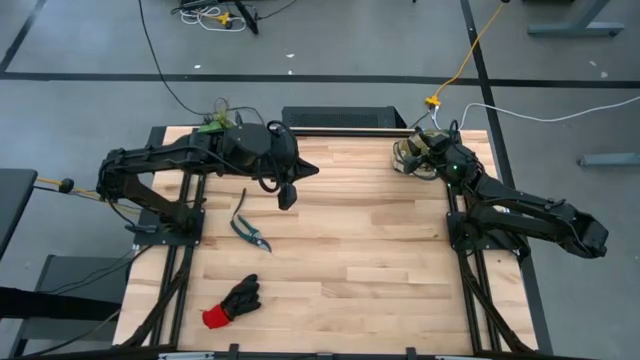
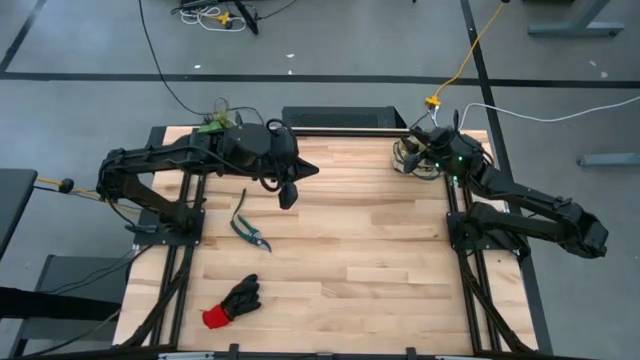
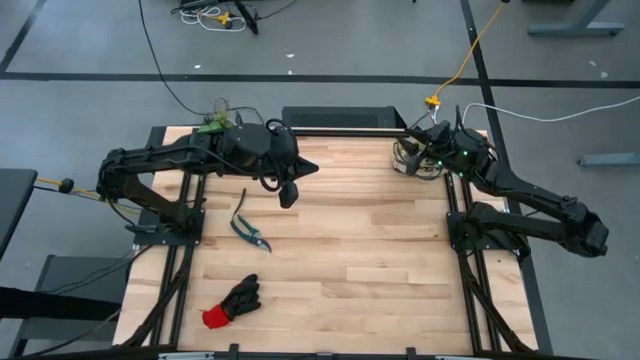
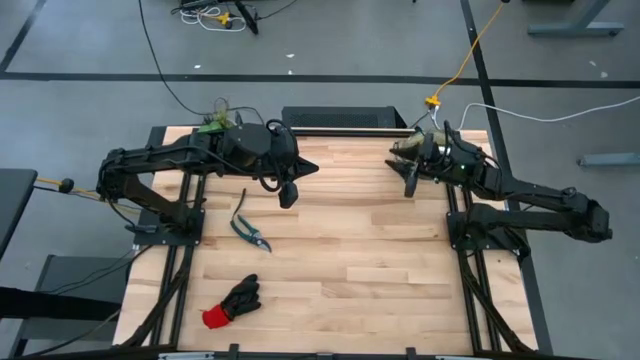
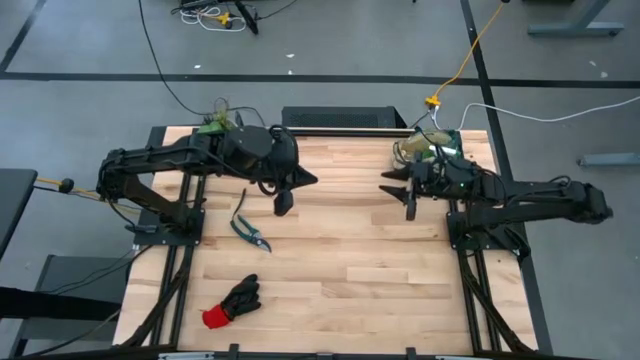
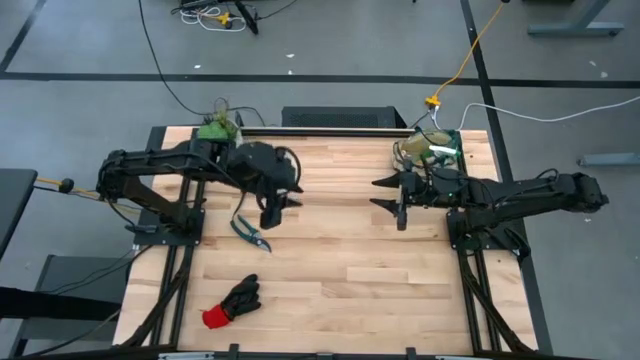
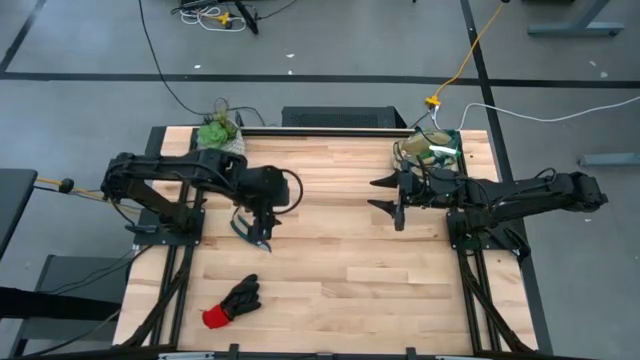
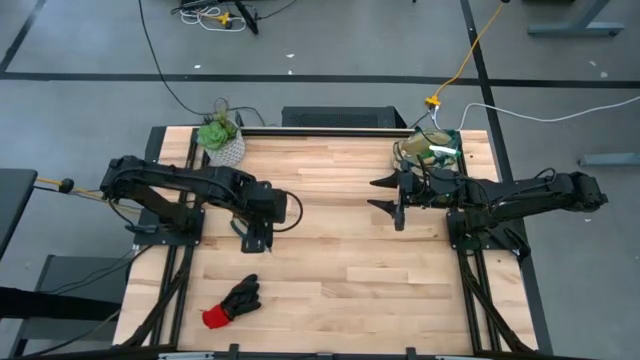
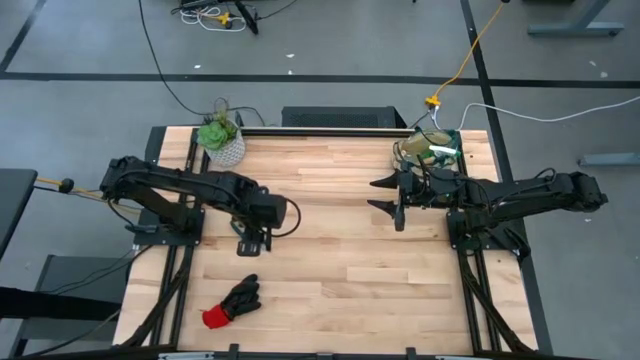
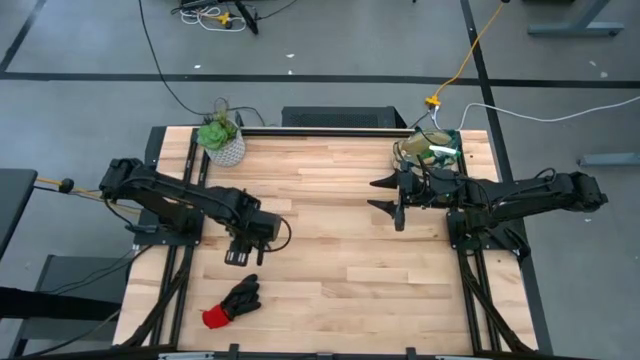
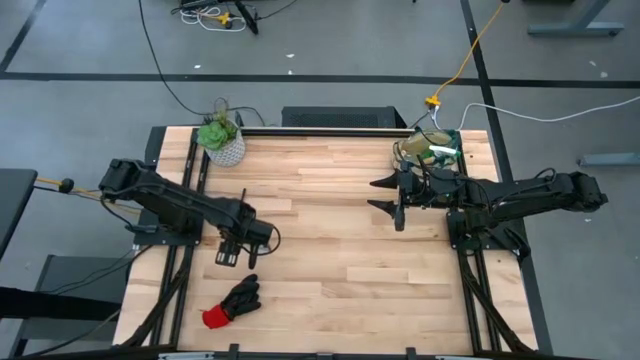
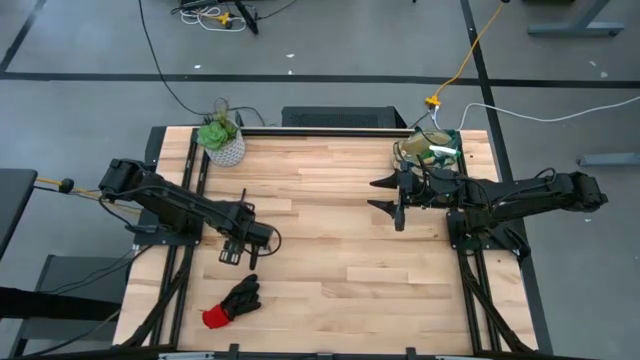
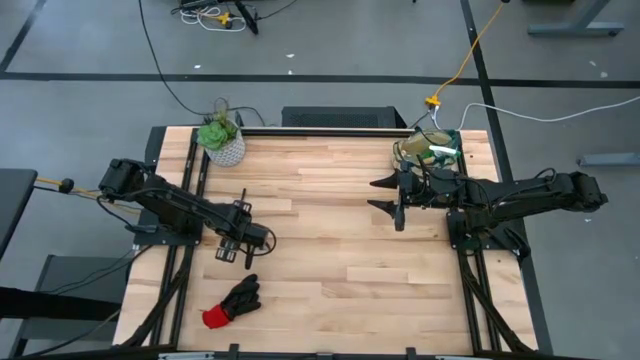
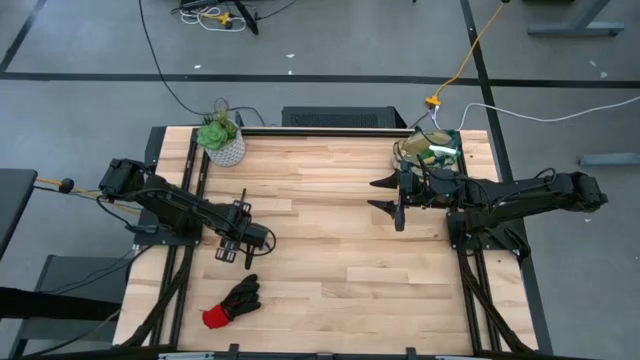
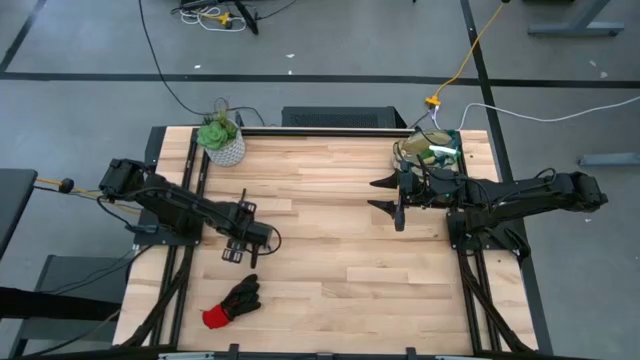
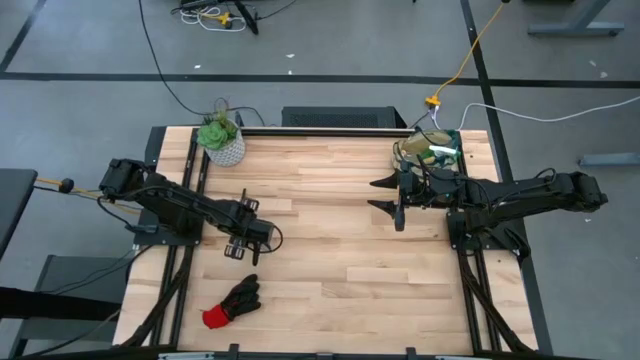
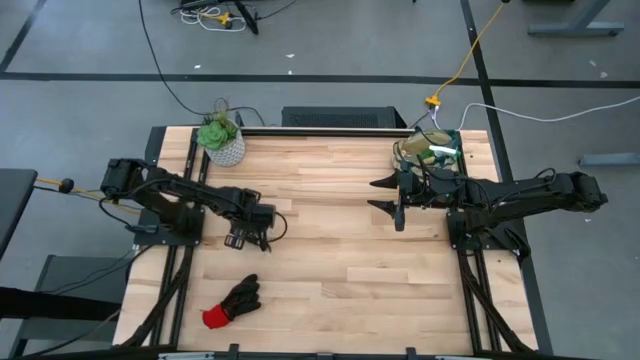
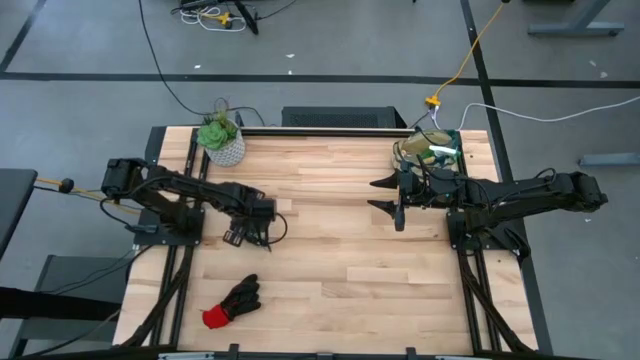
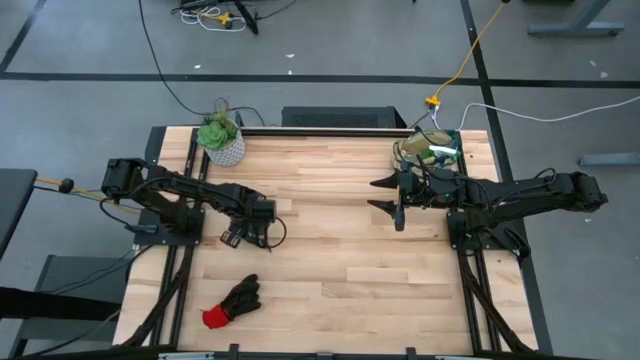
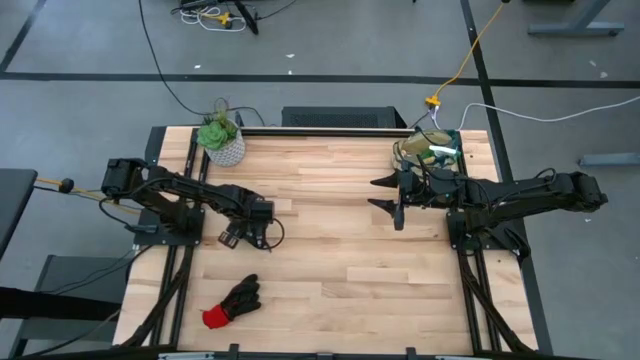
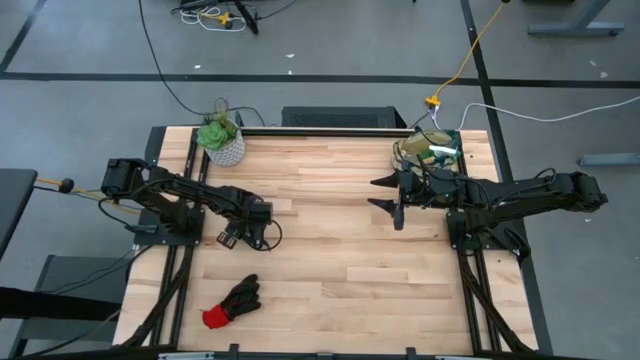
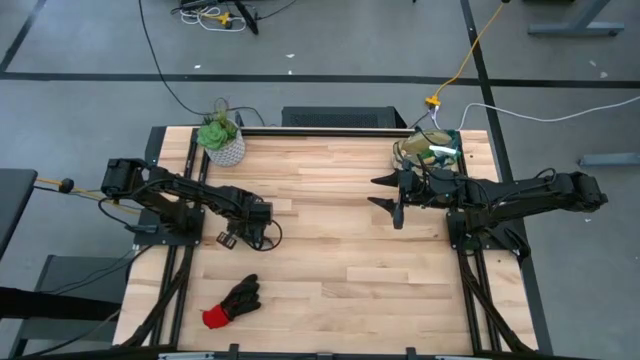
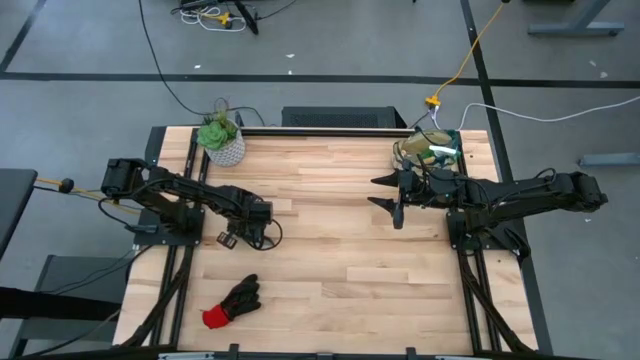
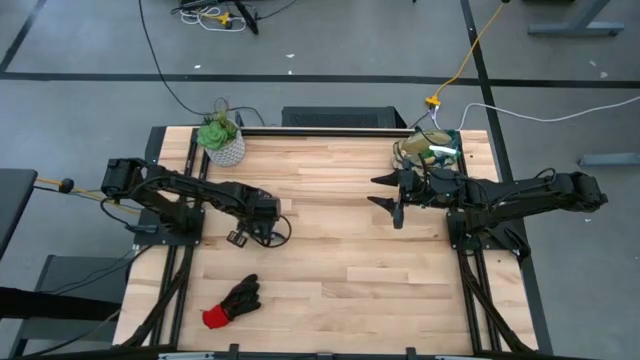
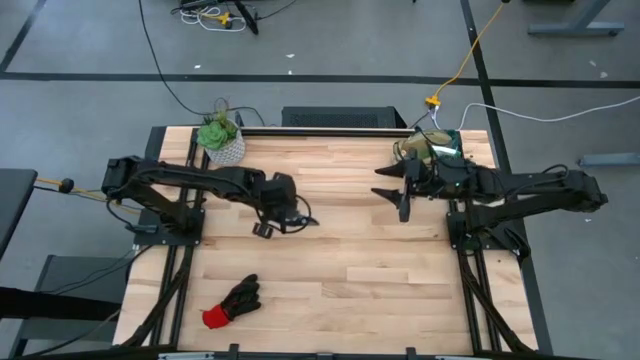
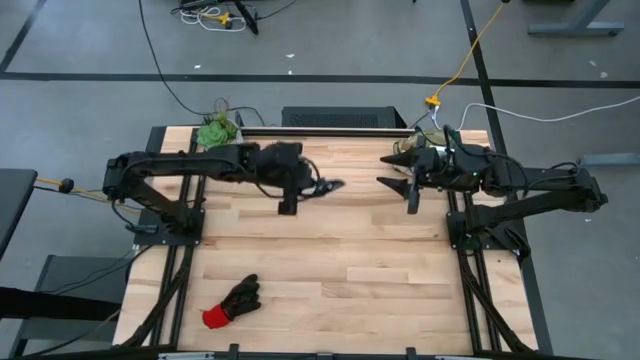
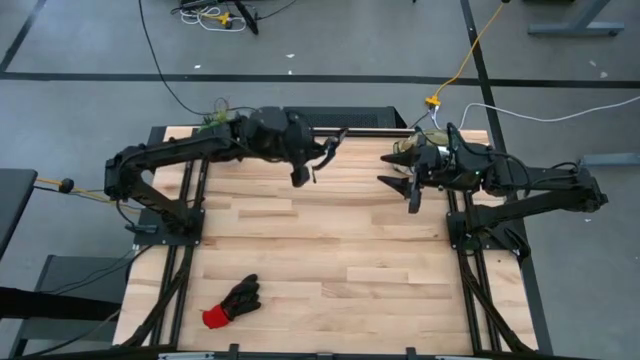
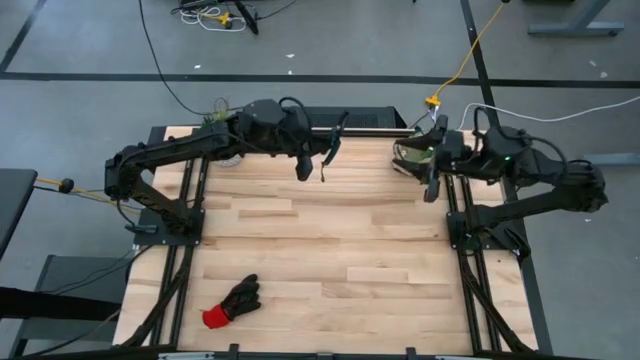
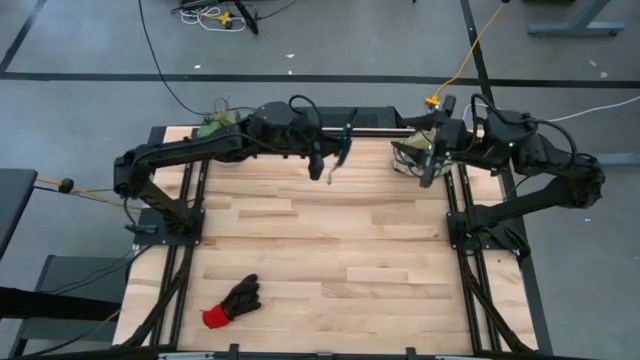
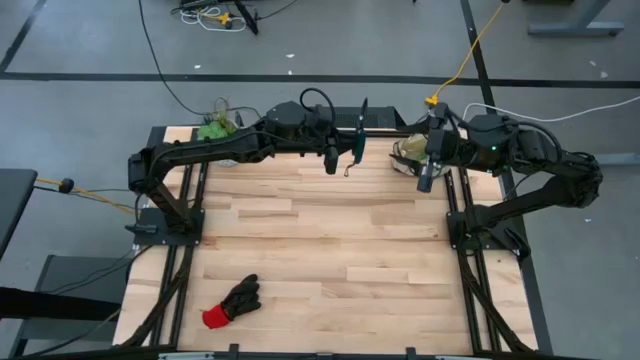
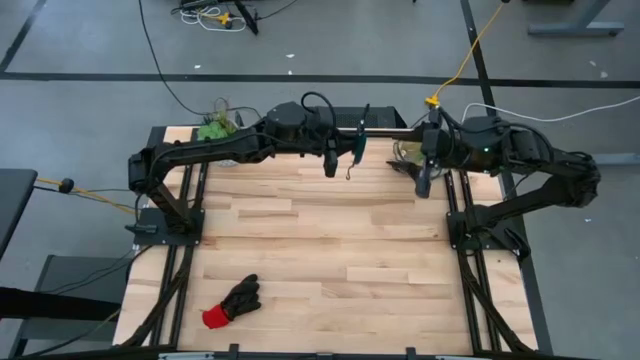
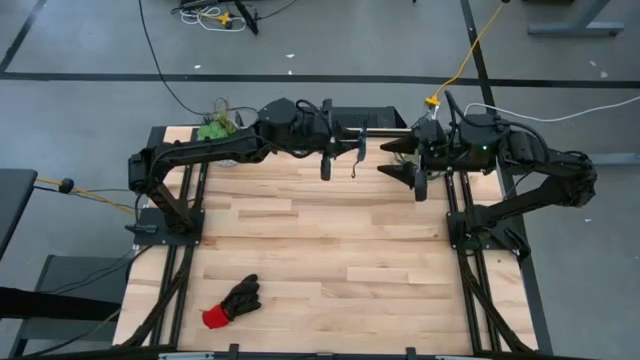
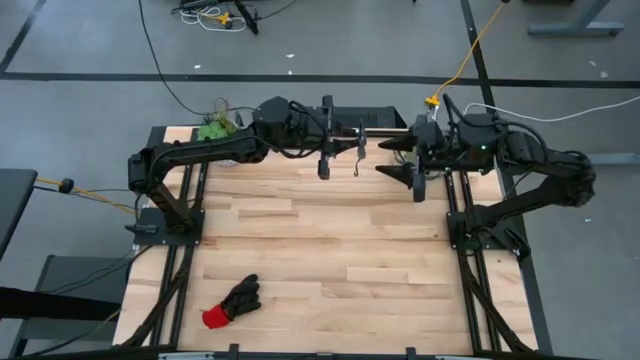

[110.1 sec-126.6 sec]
Task: Pick & Place Garden tools in Gardening bag
Put the green shear scissors into the brown gardening bag

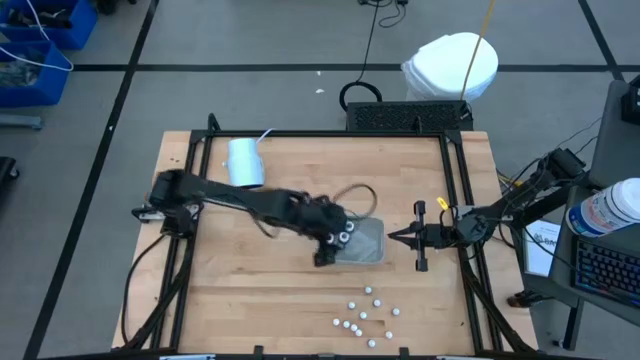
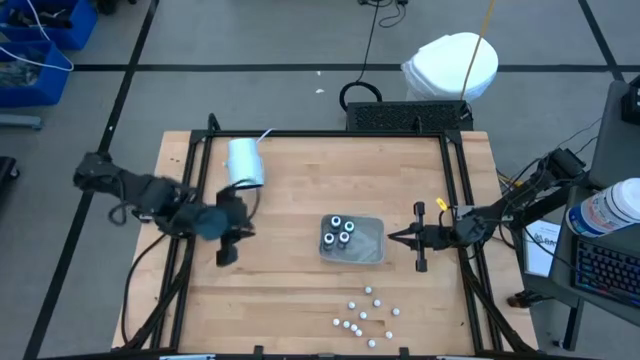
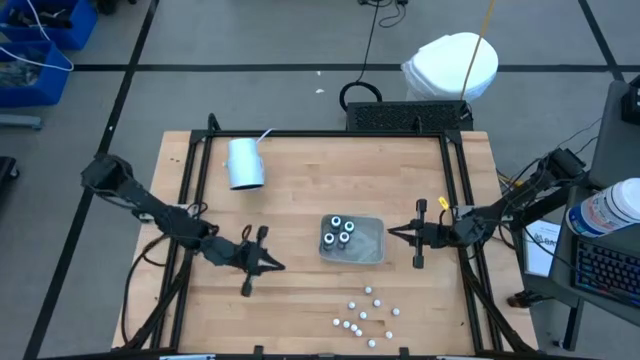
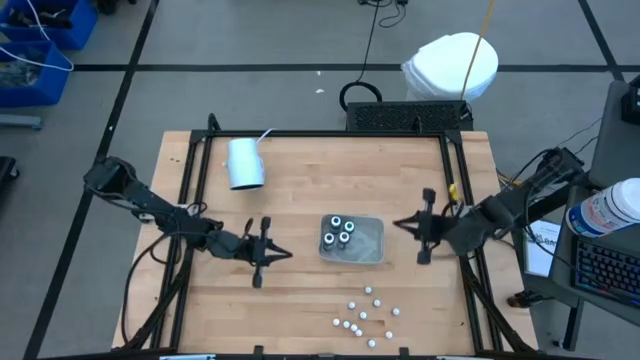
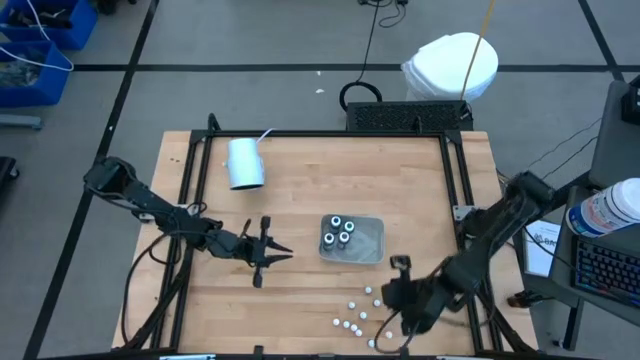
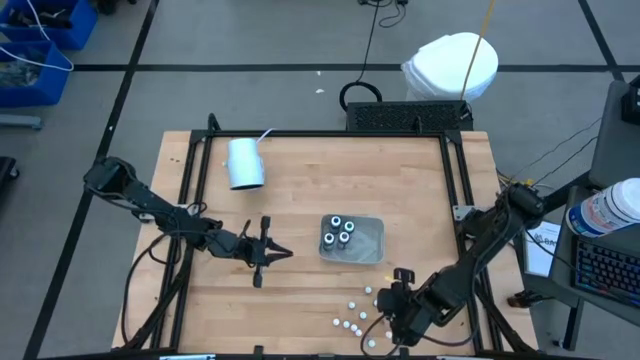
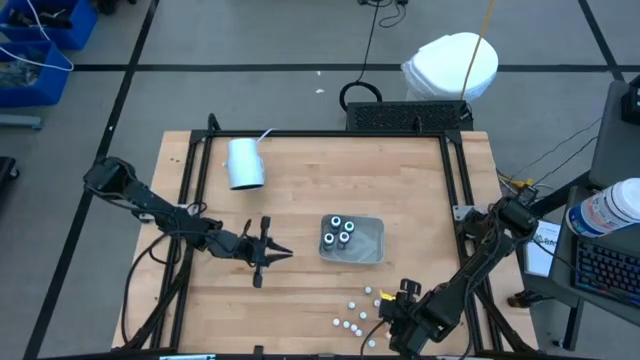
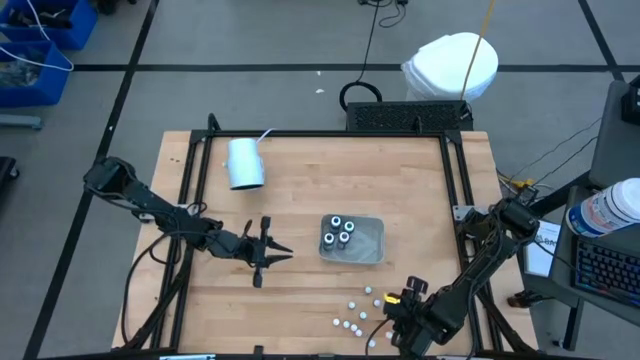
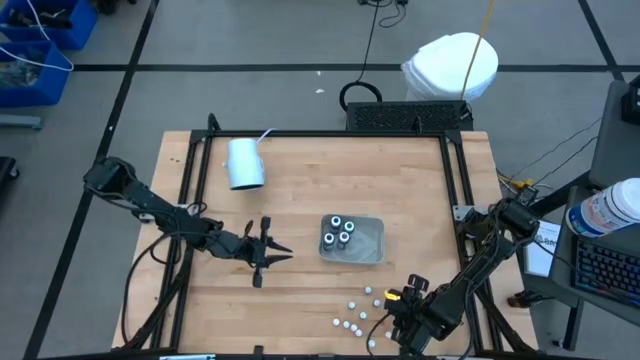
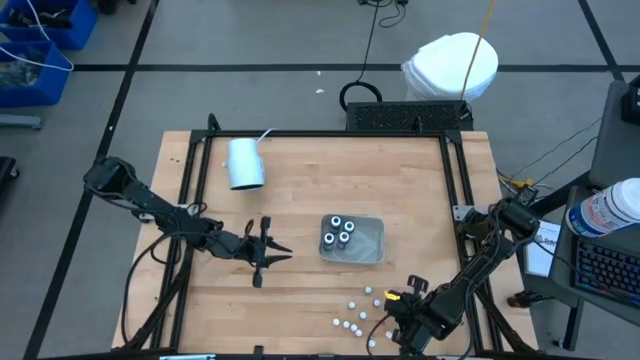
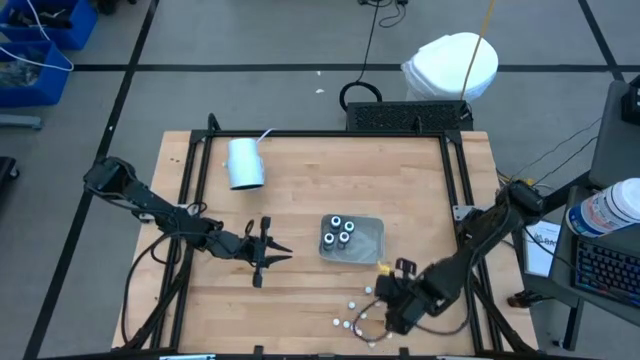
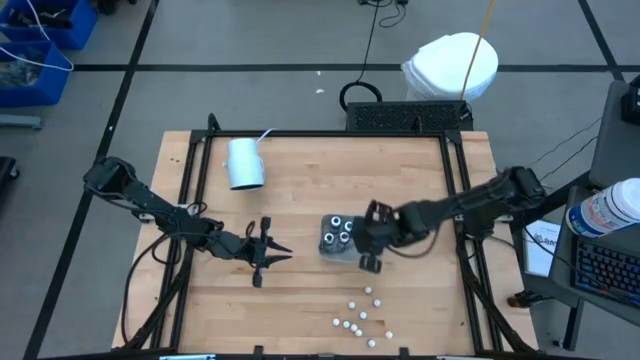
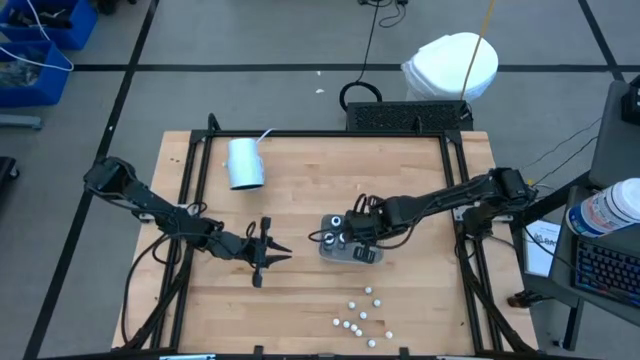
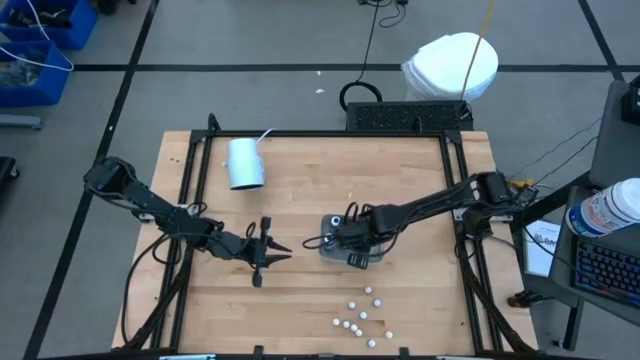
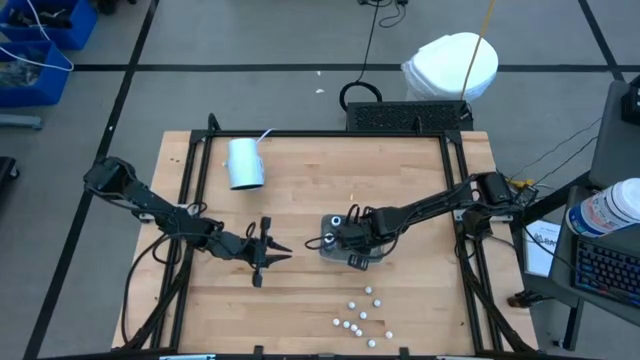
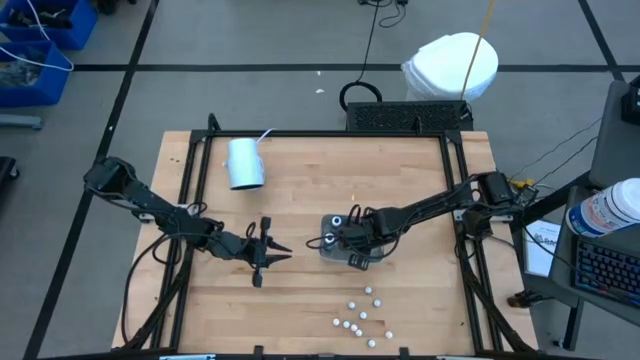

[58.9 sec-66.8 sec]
Task: Pick & Place food coloring
Put the red food coloring bottle into the gray bin
